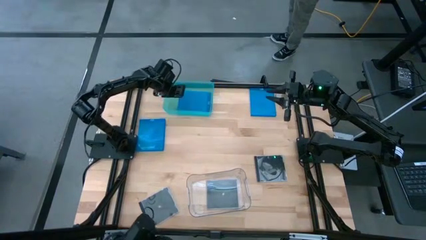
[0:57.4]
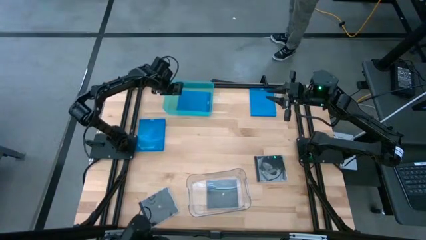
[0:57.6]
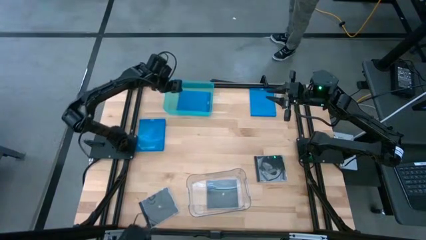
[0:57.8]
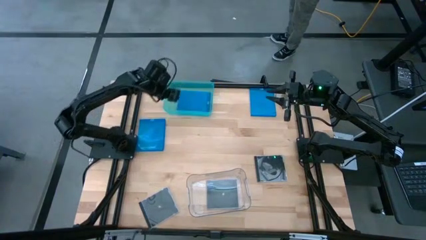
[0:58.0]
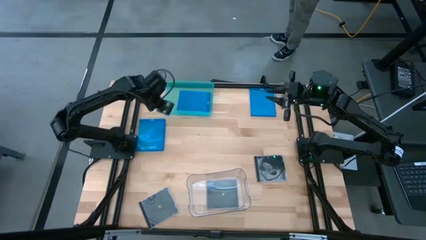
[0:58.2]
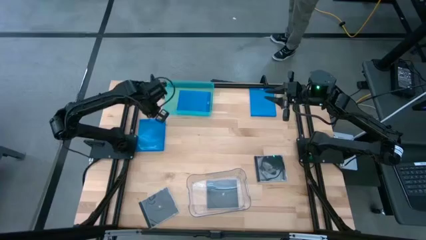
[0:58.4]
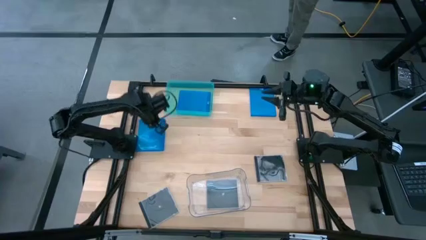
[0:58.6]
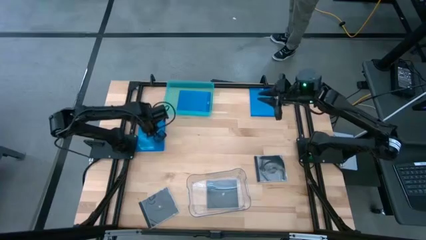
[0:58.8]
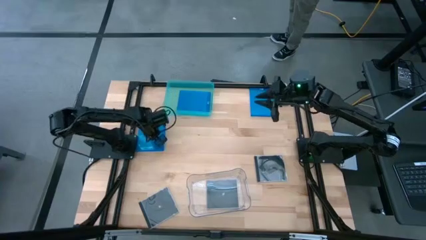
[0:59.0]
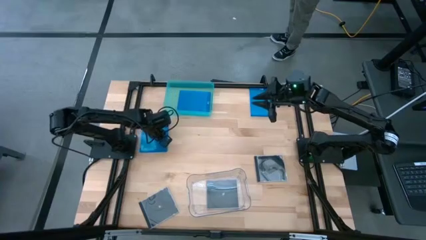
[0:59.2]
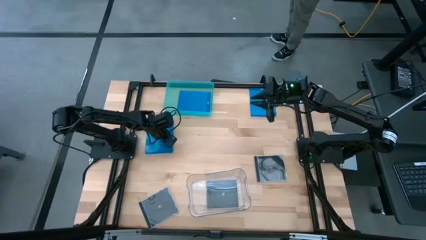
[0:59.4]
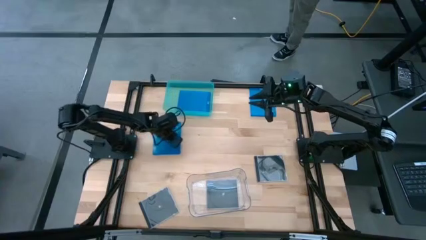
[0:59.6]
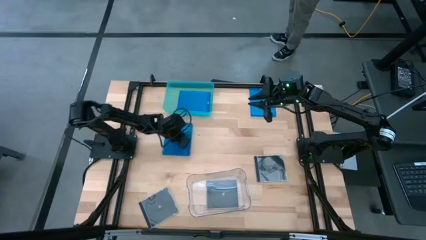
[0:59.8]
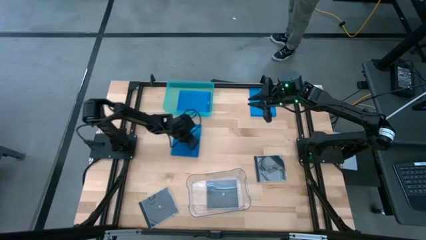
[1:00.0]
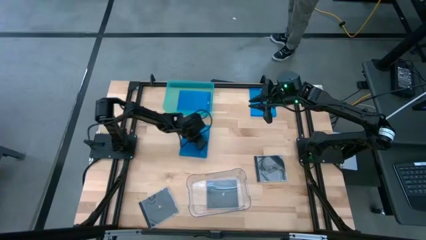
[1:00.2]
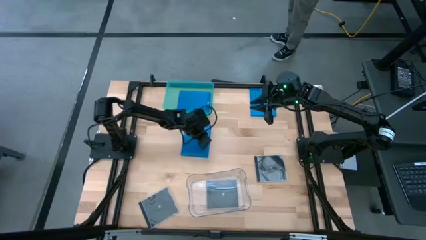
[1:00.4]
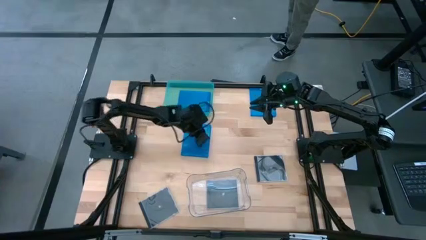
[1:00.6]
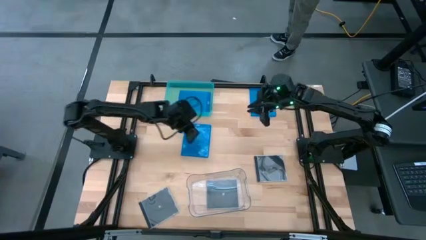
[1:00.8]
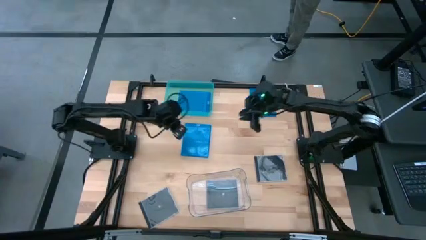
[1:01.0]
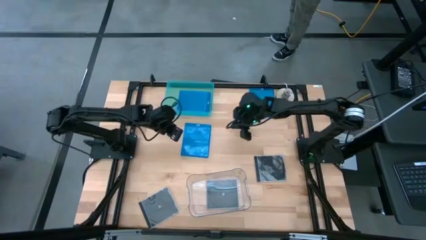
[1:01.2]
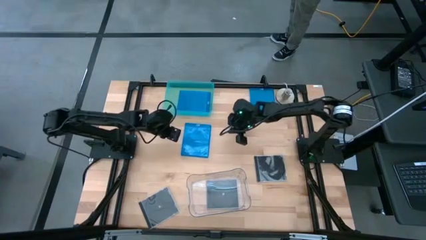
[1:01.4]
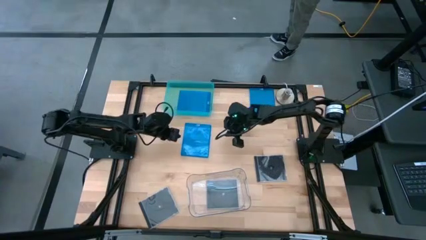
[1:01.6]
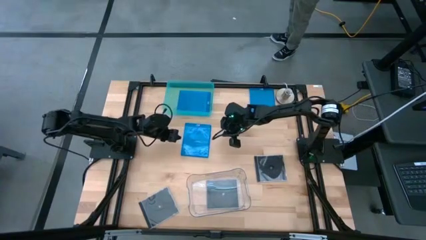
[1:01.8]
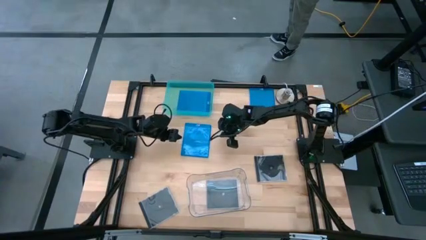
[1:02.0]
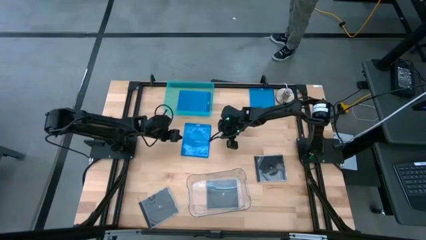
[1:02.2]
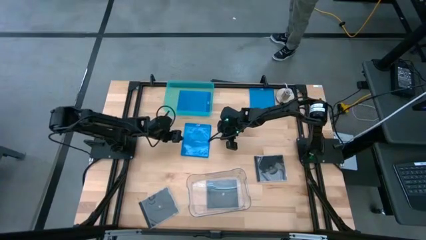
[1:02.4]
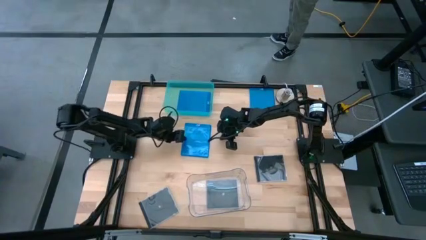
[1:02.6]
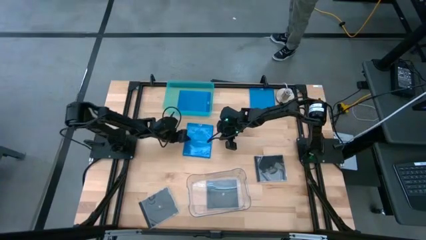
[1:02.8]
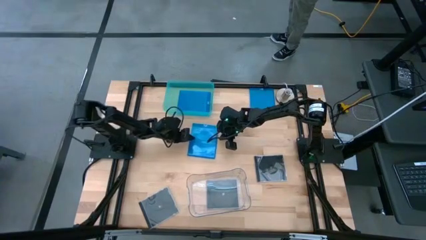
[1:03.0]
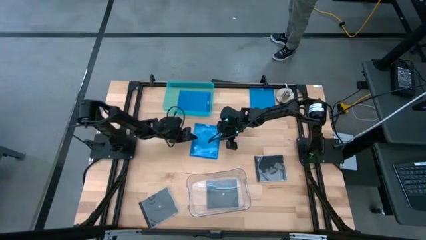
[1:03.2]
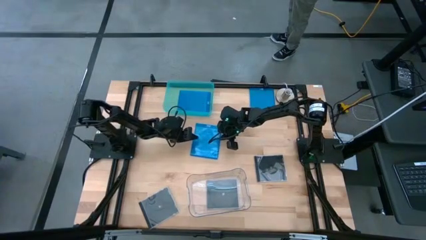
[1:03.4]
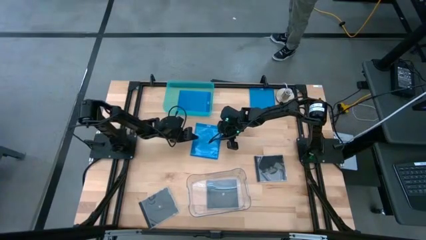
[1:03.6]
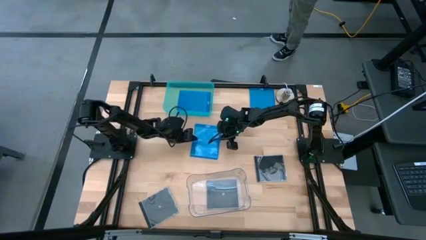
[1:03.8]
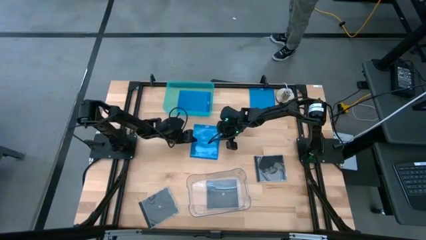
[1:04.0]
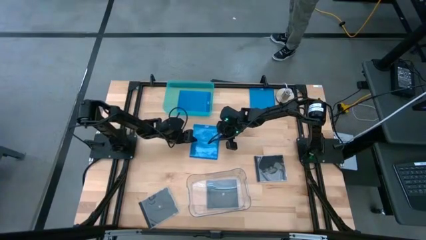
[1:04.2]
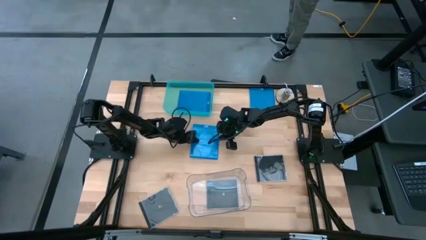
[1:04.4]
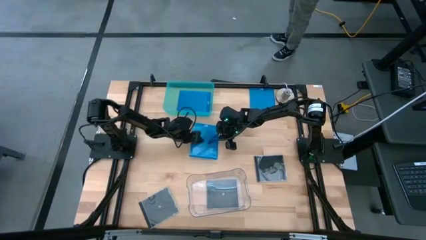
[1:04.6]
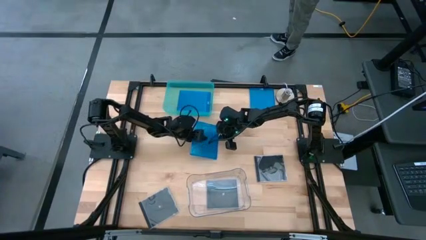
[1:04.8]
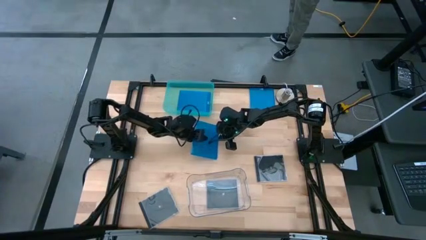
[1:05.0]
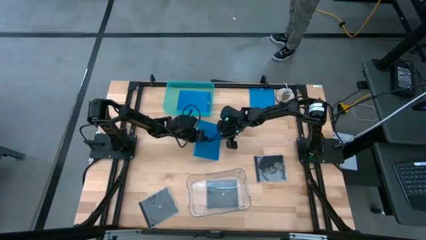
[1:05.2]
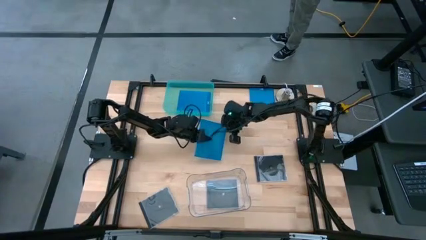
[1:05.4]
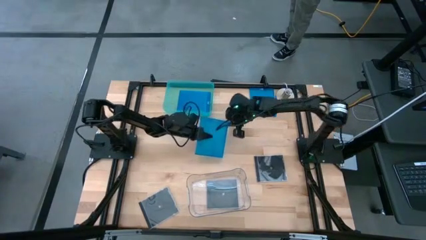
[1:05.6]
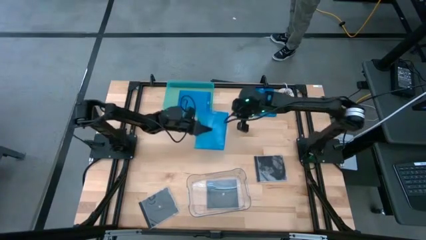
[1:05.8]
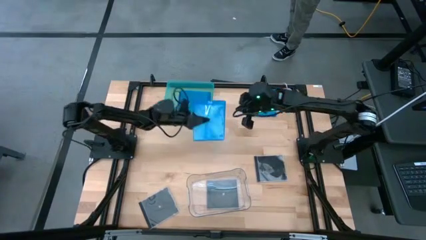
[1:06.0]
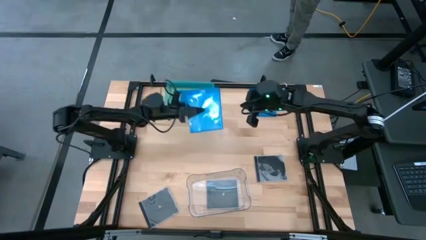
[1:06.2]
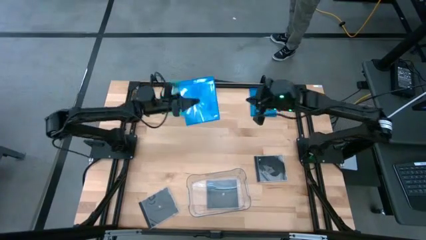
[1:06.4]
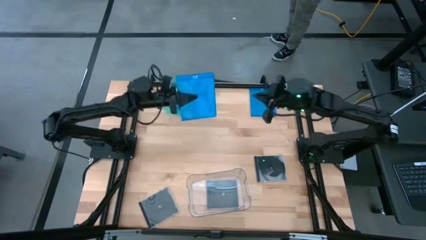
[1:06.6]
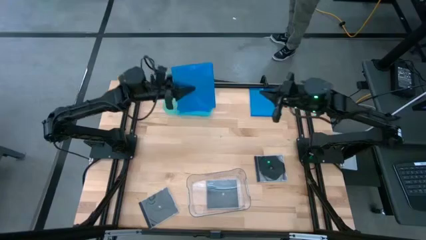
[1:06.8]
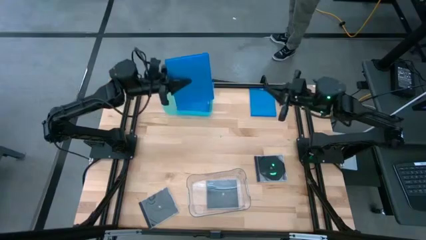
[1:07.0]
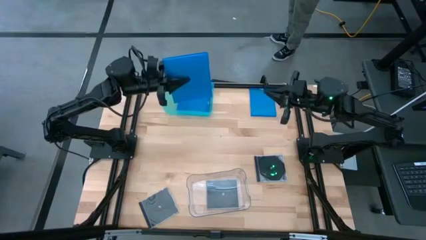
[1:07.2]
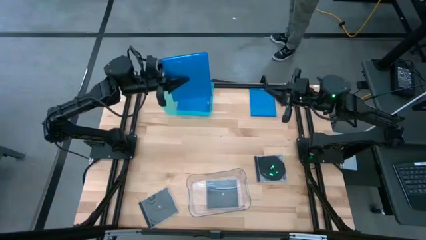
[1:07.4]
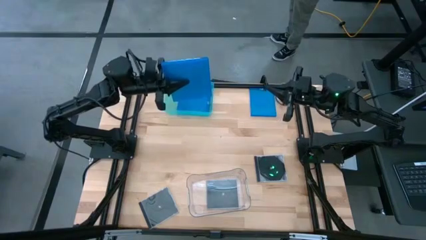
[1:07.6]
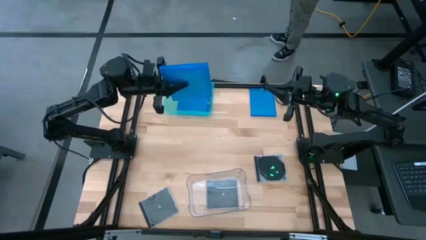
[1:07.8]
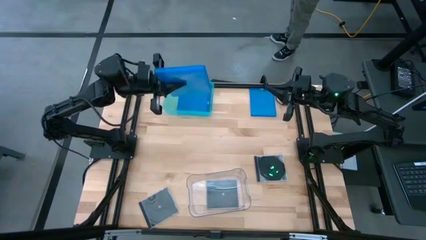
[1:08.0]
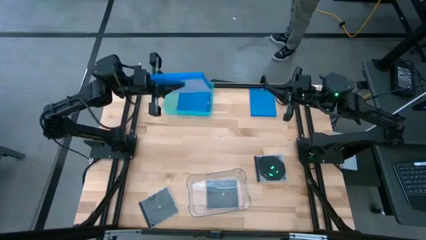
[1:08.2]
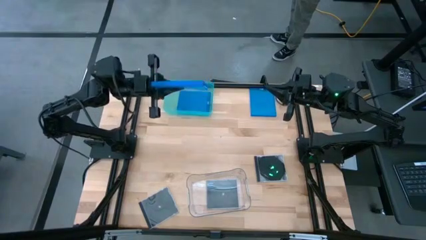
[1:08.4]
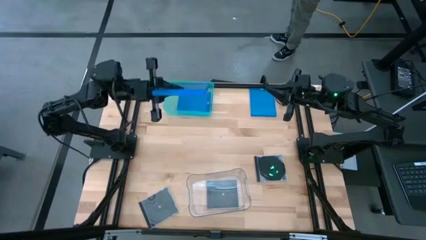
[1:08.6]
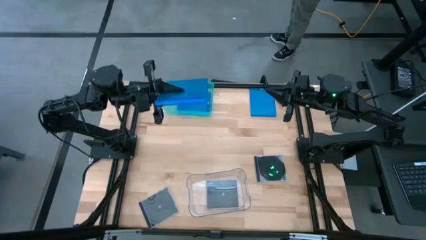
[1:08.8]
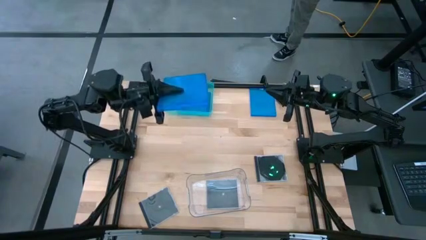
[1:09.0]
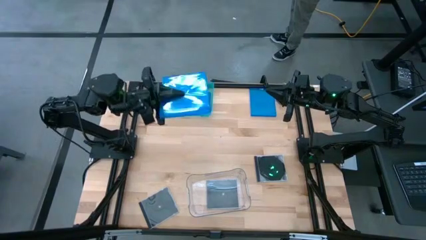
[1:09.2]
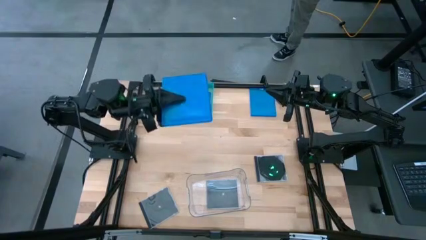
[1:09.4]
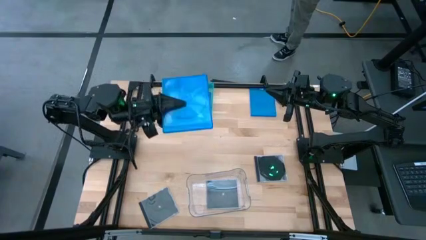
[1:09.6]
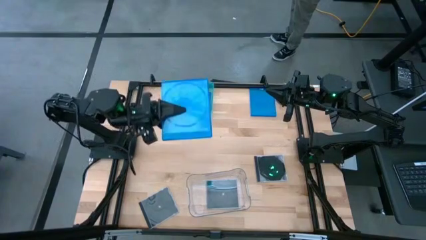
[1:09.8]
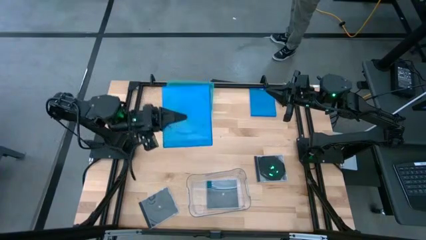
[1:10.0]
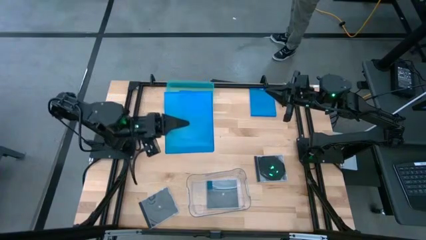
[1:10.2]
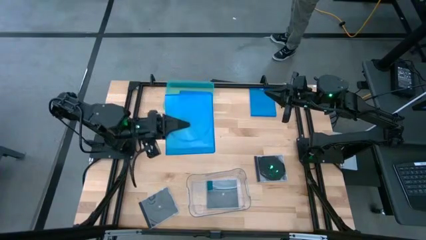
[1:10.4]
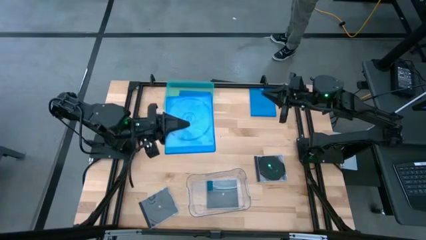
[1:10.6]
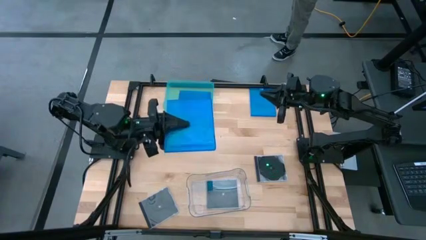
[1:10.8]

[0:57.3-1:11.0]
Task: Pick & place jewel cases by type
Put the bottom blue CD case into the green bin
